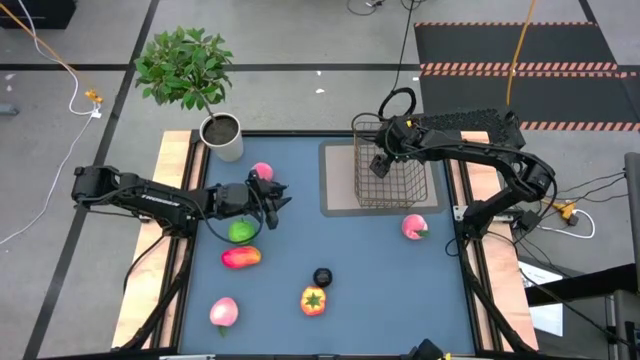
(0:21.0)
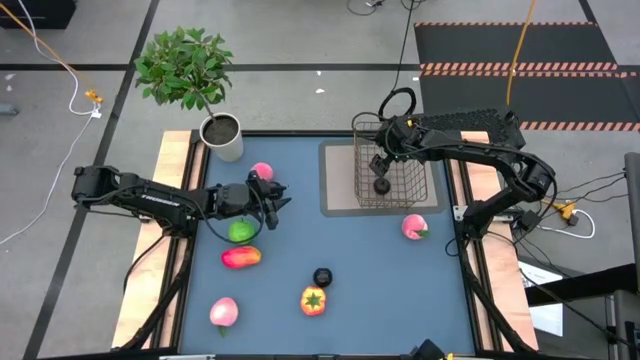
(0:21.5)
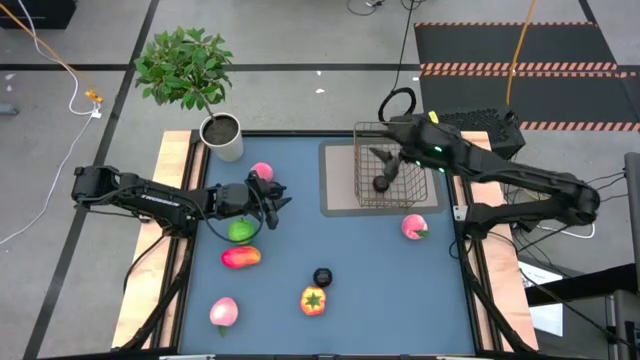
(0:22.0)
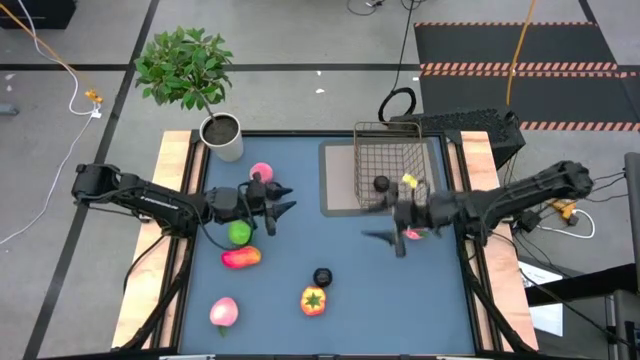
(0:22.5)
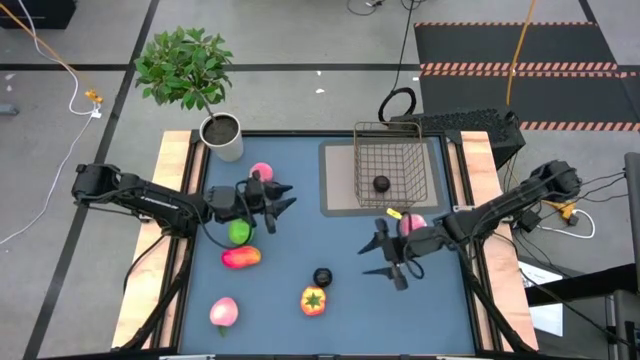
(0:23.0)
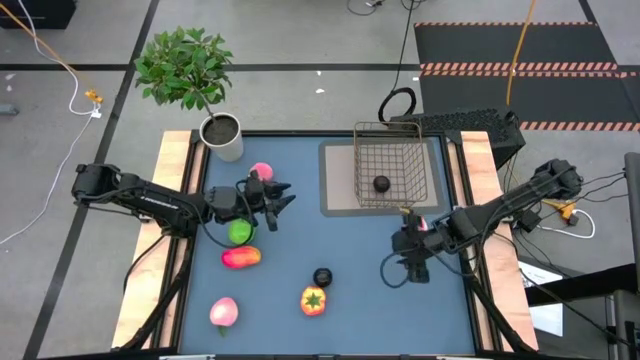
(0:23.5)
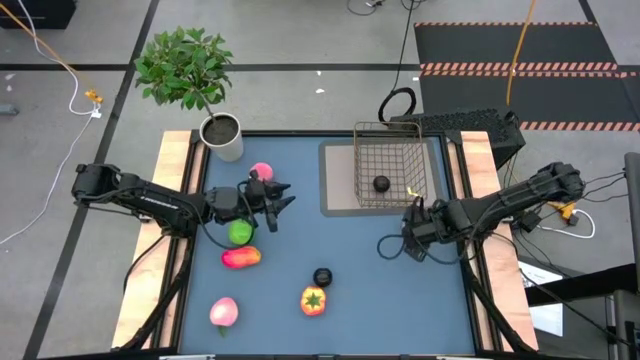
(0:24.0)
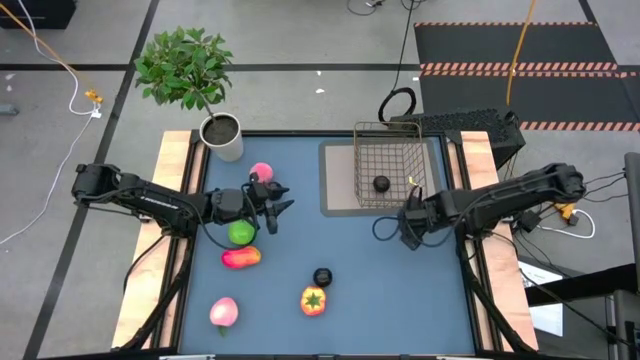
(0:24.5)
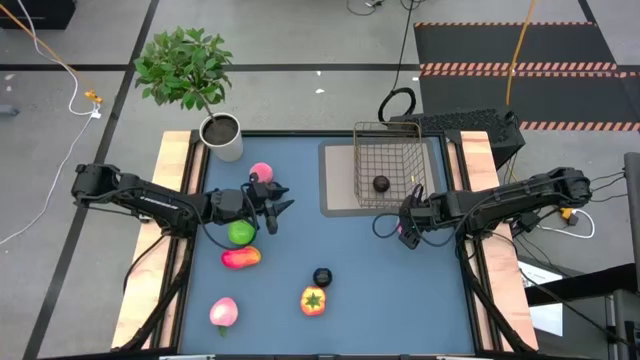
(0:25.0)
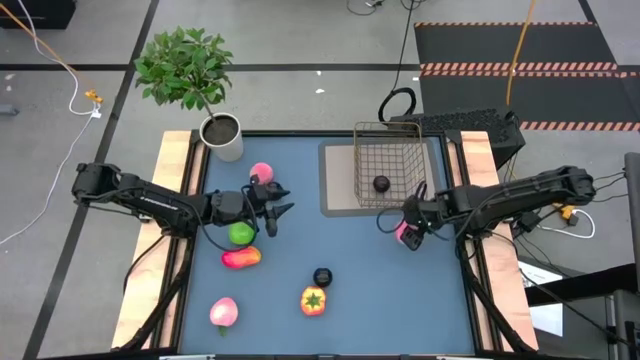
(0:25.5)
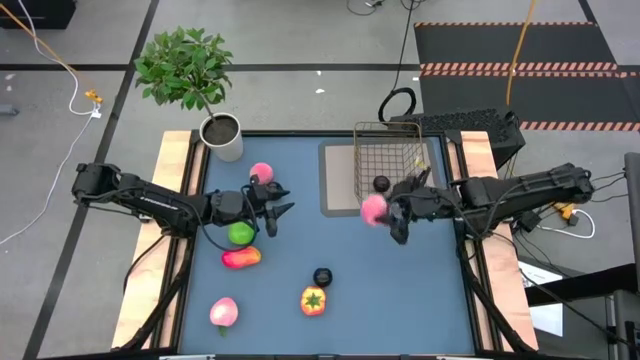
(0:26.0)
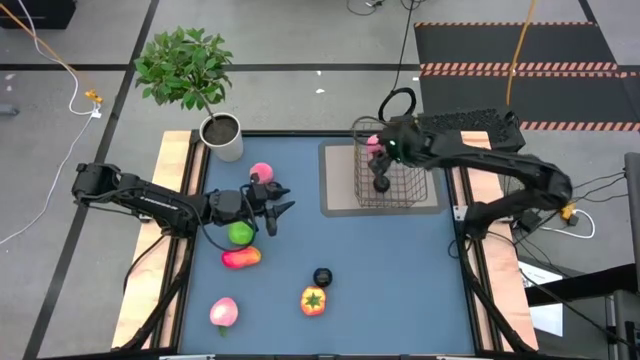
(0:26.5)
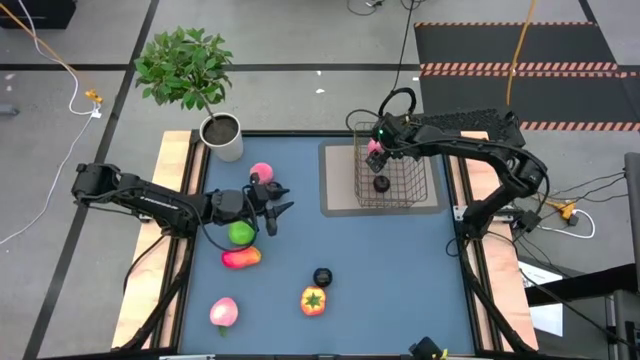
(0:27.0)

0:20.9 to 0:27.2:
Task: Build produce basket
Put the middle right pink peach into the gold wire basket

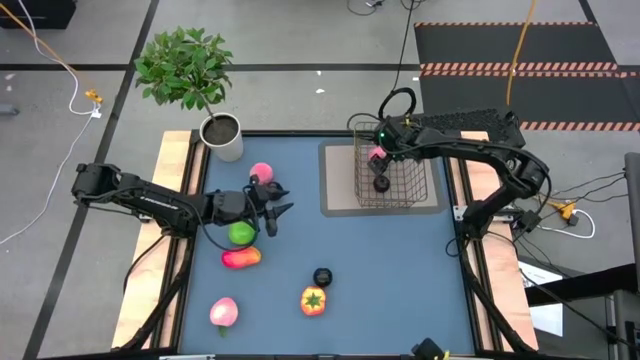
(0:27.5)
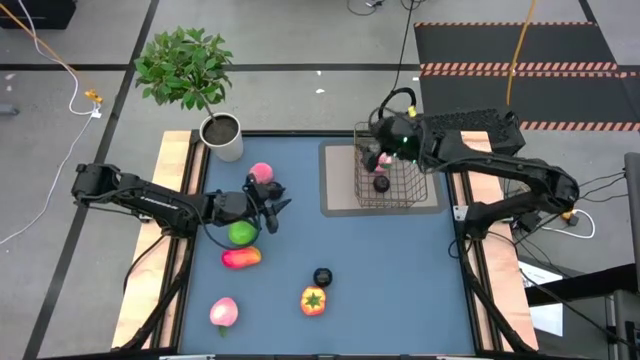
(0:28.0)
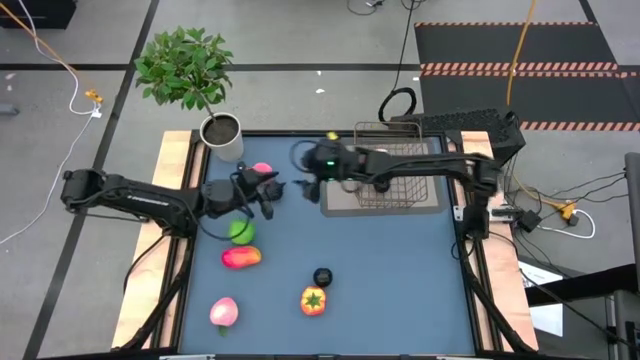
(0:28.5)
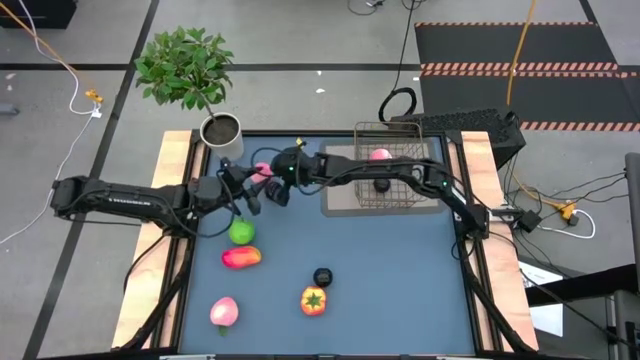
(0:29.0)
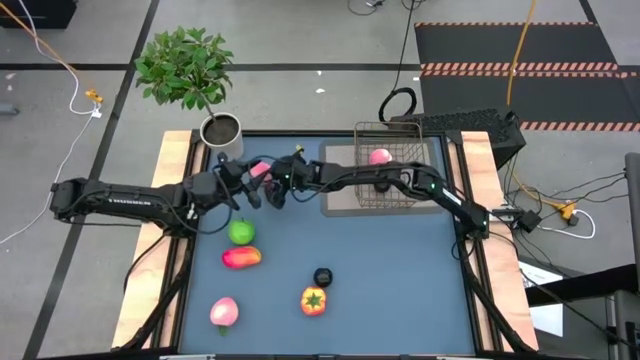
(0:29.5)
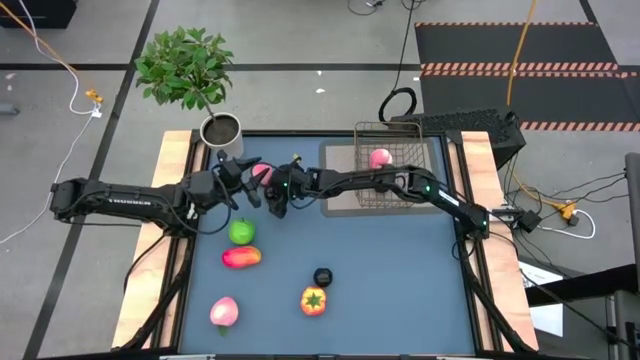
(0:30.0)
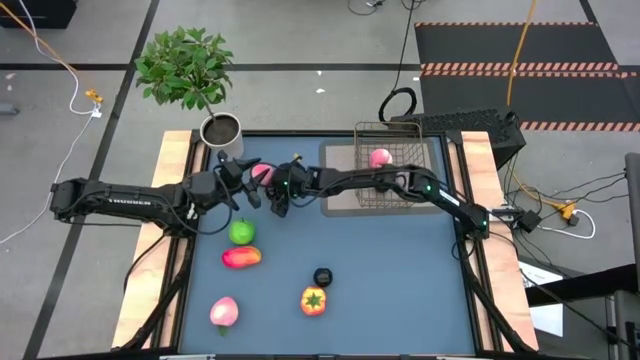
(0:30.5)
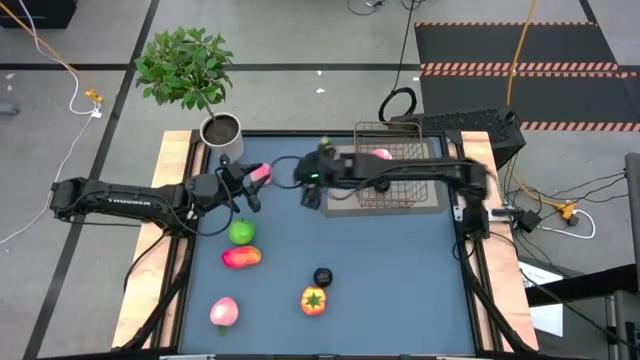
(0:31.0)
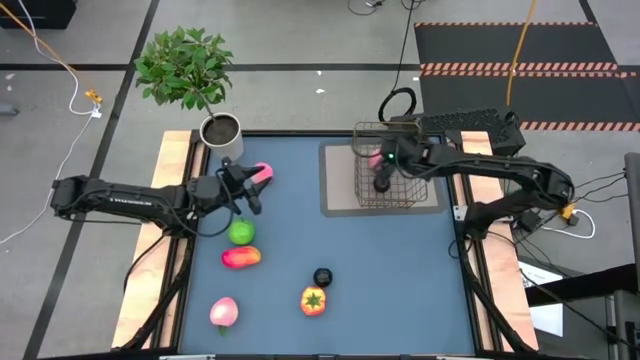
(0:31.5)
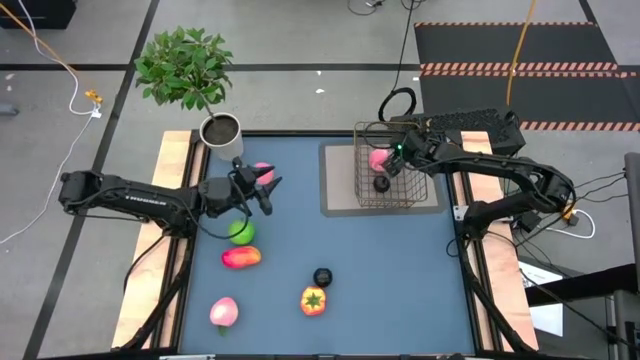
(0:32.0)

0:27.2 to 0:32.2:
Put the top black plum into the gold wire basket

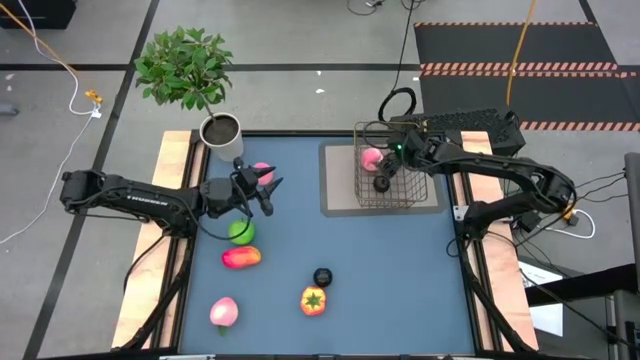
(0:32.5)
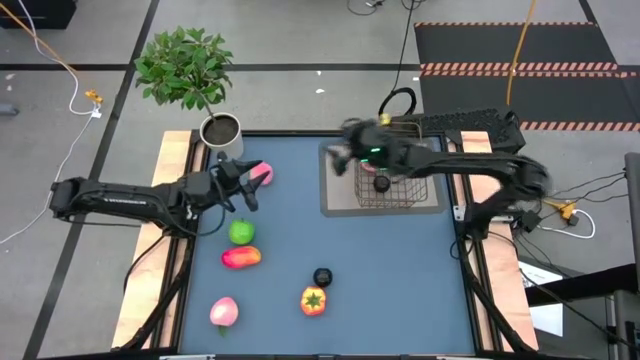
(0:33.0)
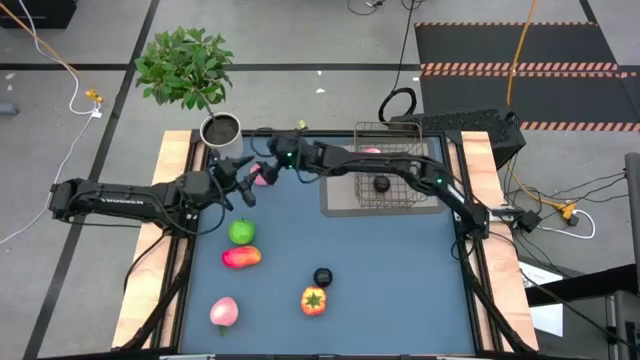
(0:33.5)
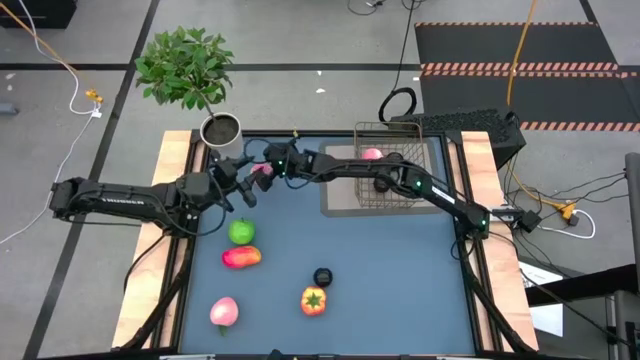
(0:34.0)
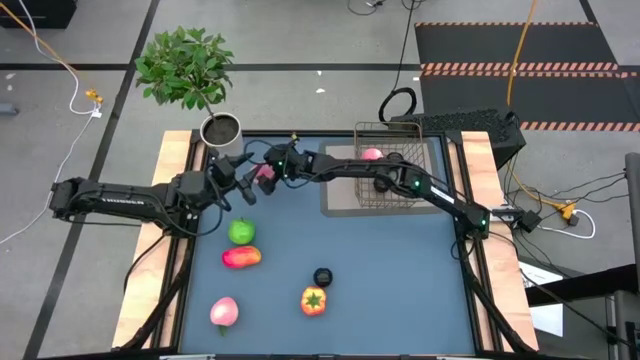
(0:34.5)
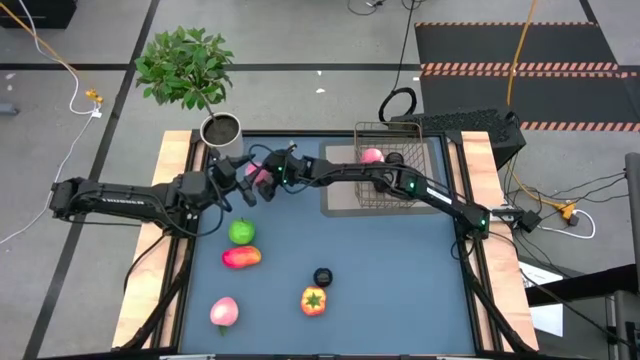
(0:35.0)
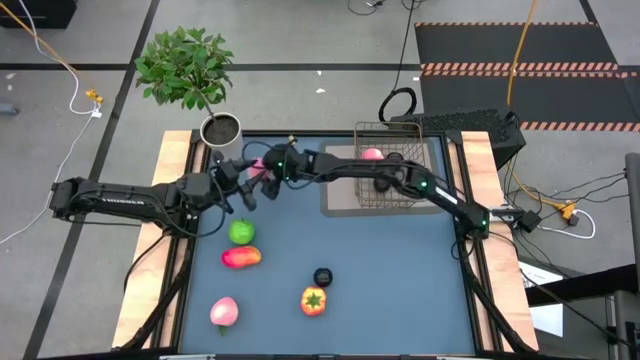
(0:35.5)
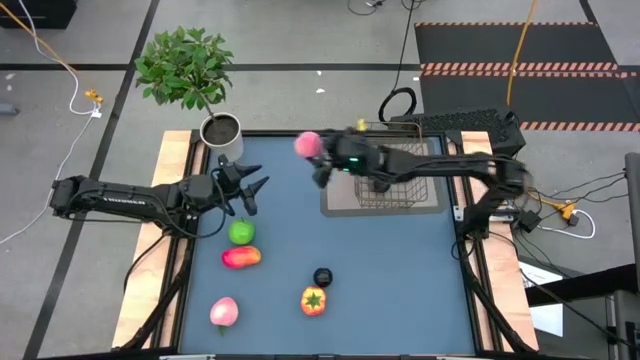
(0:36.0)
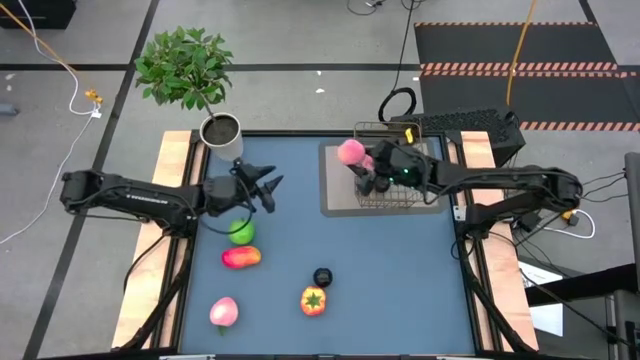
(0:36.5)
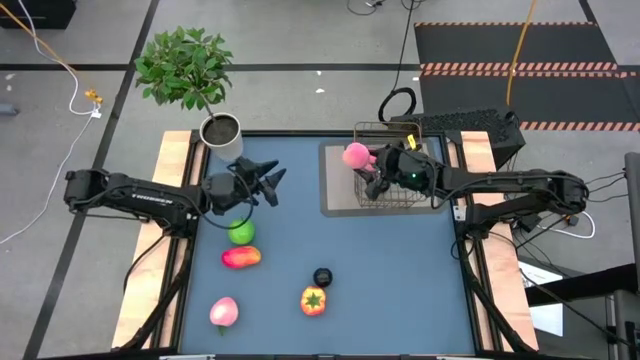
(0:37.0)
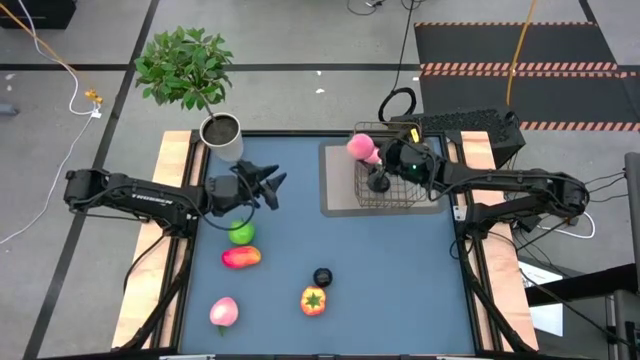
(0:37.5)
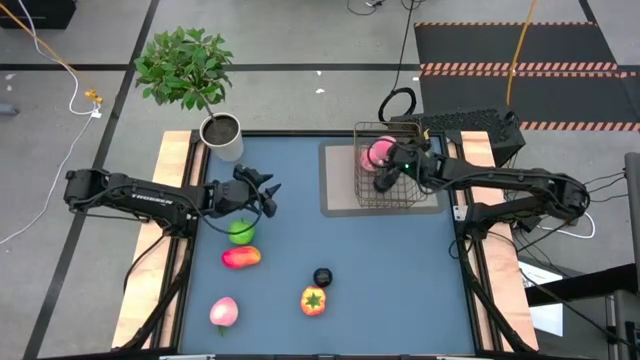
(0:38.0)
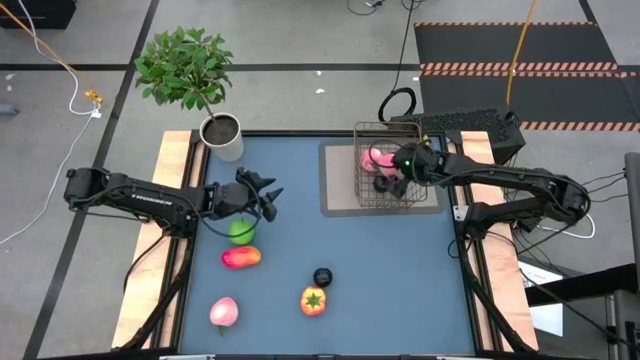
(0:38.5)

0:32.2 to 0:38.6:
Put the top pink peach into the gold wire basket

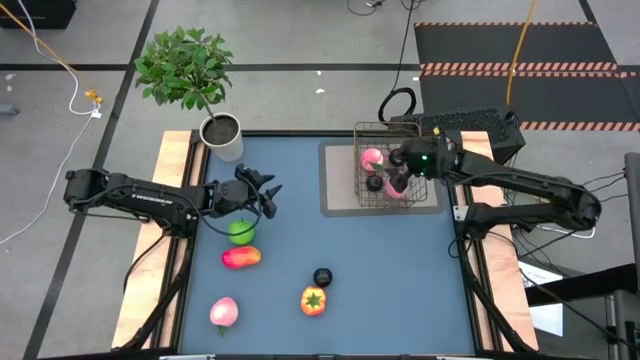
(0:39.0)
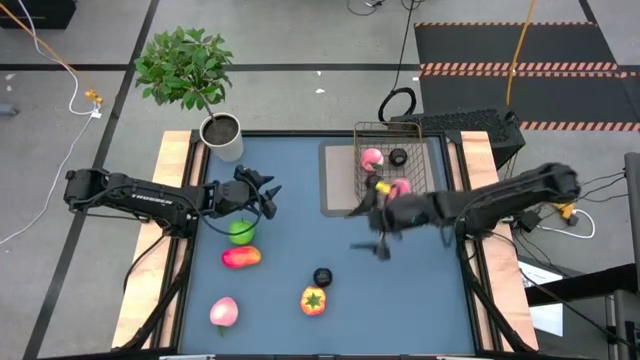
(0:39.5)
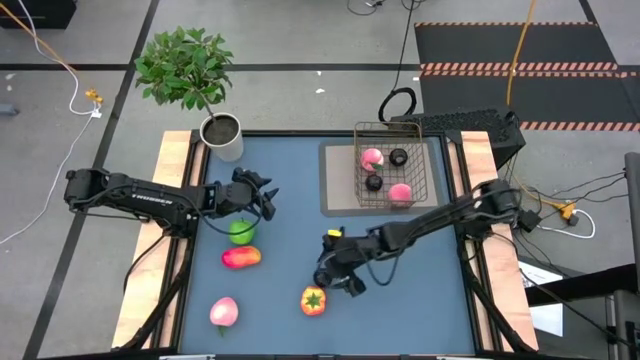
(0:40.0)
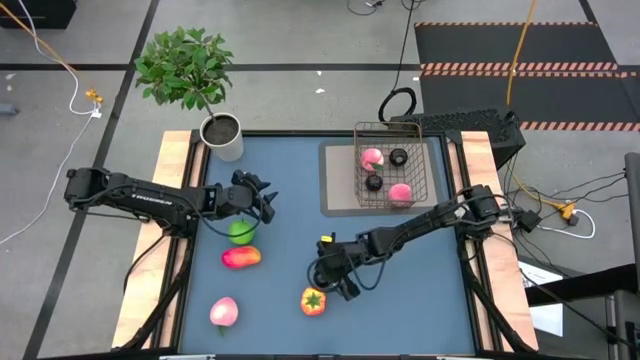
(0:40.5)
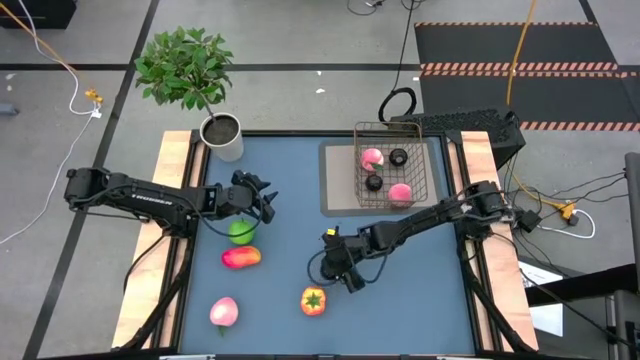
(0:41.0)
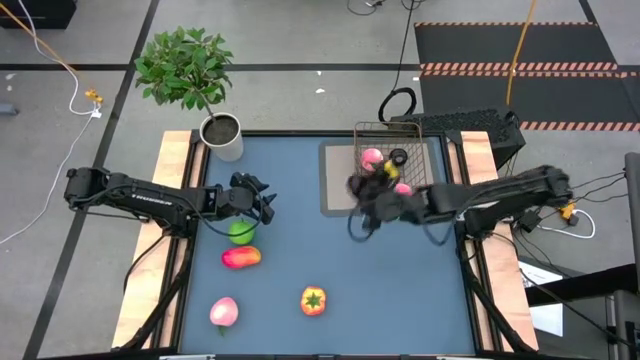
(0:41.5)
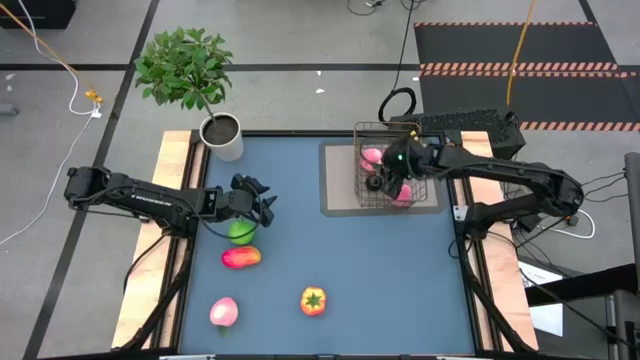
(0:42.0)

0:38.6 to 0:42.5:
Put the black plum into the gold wire basket
